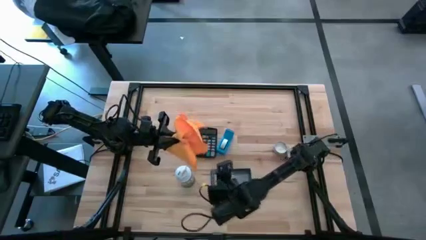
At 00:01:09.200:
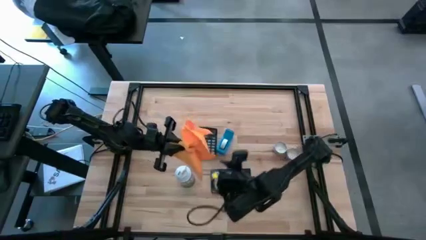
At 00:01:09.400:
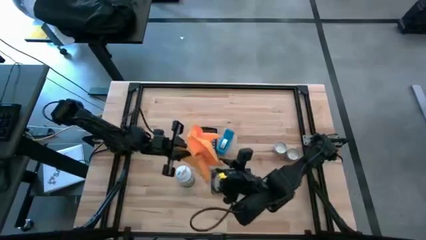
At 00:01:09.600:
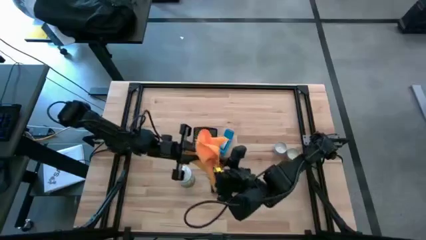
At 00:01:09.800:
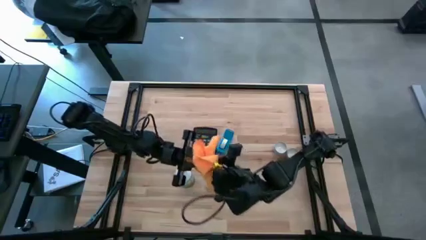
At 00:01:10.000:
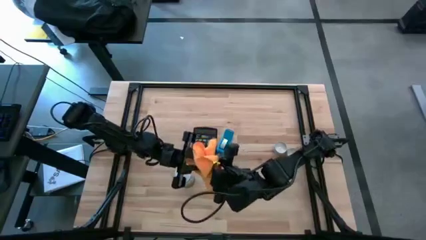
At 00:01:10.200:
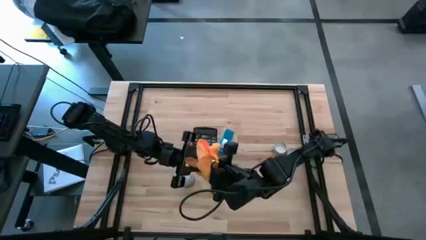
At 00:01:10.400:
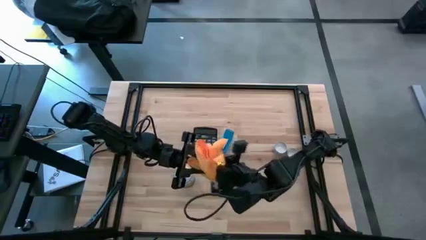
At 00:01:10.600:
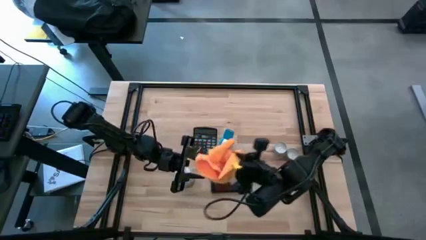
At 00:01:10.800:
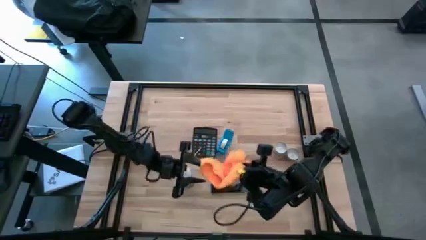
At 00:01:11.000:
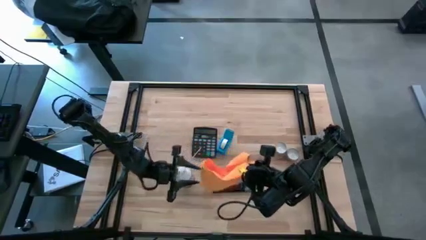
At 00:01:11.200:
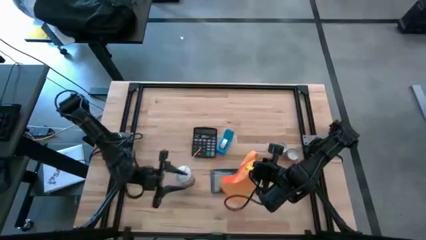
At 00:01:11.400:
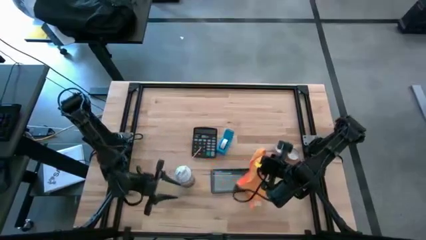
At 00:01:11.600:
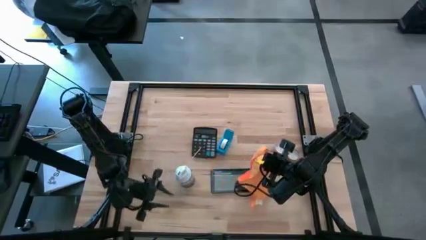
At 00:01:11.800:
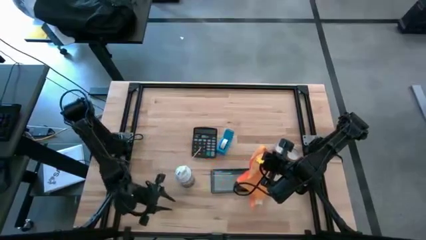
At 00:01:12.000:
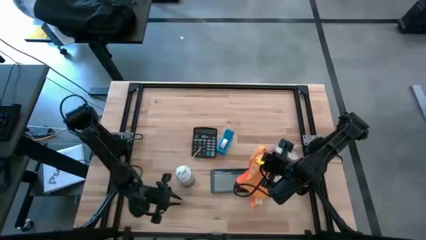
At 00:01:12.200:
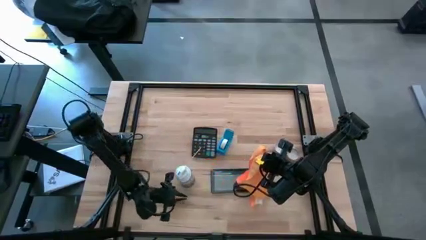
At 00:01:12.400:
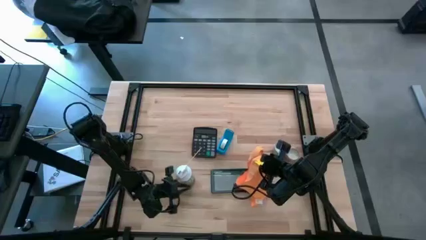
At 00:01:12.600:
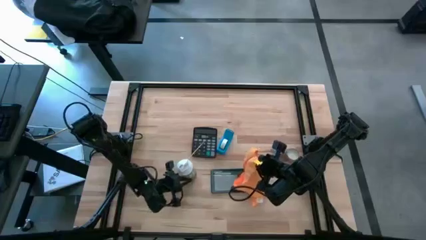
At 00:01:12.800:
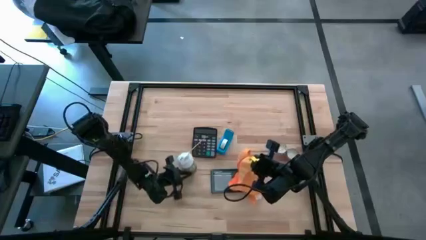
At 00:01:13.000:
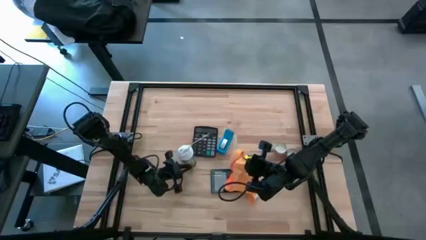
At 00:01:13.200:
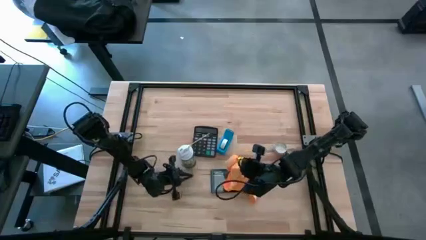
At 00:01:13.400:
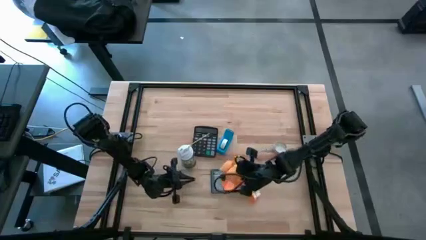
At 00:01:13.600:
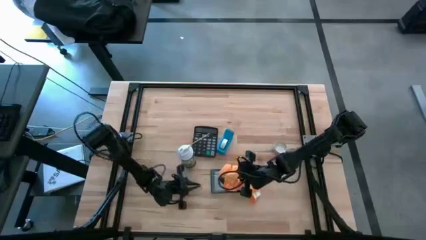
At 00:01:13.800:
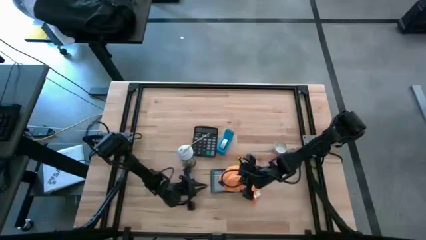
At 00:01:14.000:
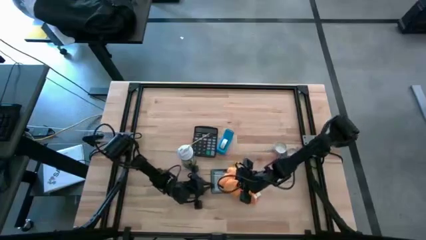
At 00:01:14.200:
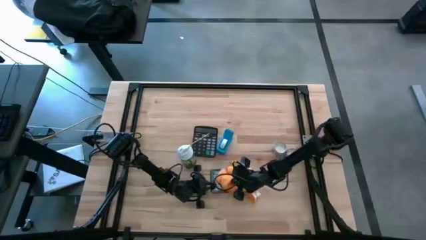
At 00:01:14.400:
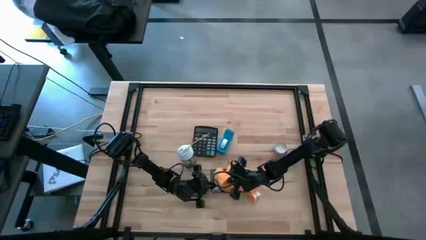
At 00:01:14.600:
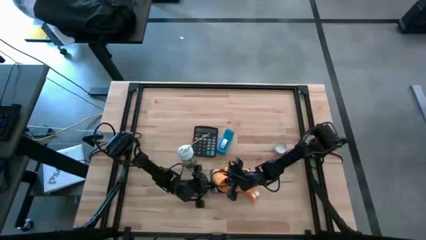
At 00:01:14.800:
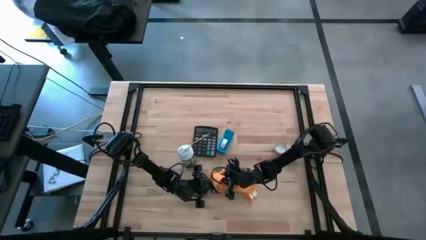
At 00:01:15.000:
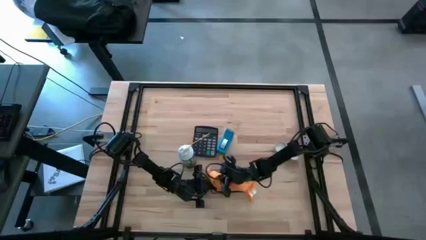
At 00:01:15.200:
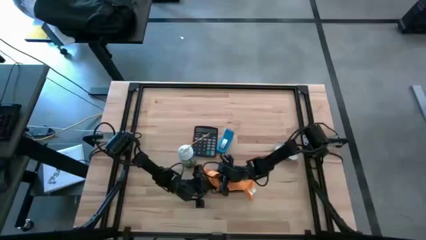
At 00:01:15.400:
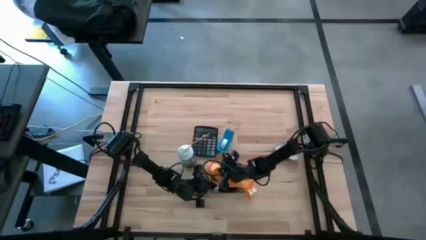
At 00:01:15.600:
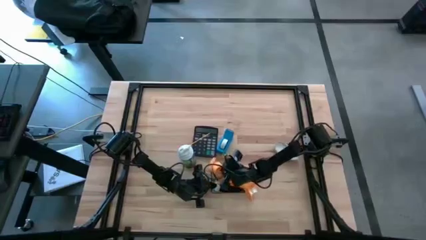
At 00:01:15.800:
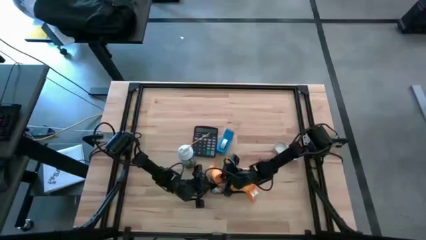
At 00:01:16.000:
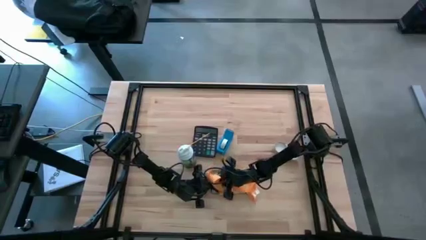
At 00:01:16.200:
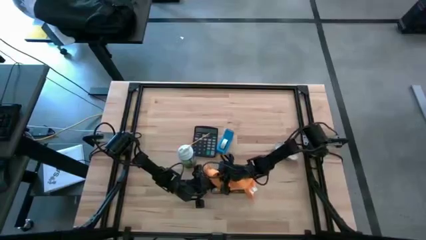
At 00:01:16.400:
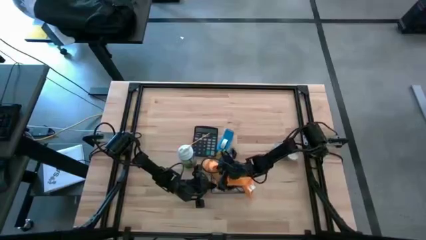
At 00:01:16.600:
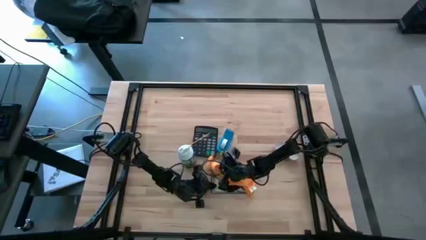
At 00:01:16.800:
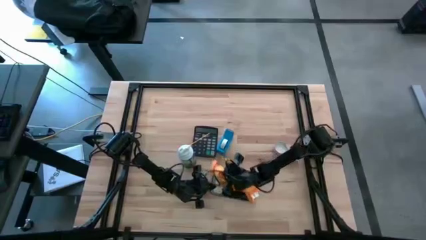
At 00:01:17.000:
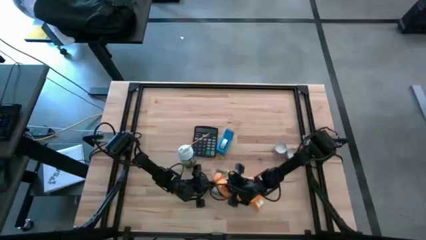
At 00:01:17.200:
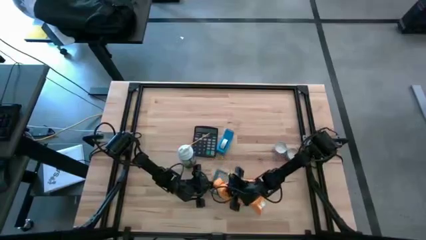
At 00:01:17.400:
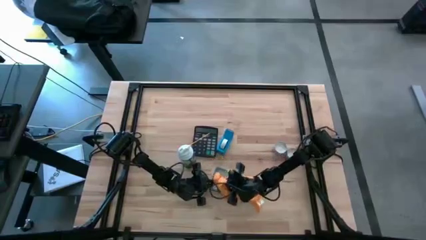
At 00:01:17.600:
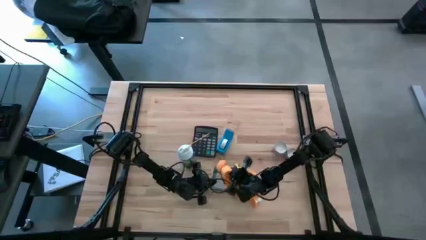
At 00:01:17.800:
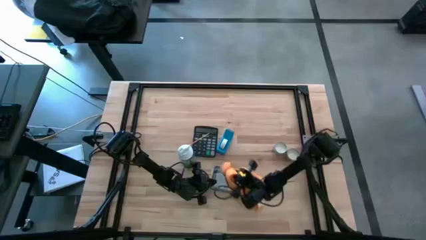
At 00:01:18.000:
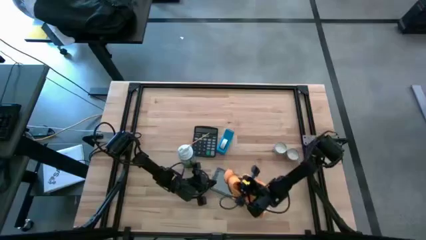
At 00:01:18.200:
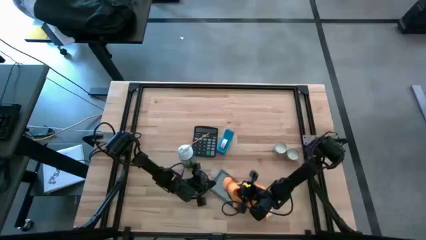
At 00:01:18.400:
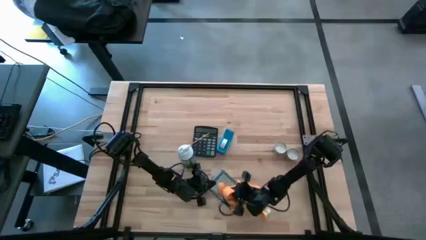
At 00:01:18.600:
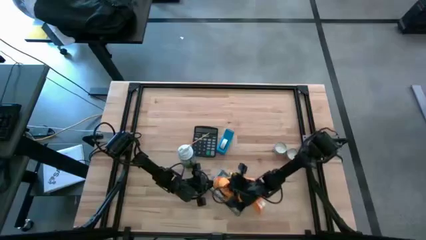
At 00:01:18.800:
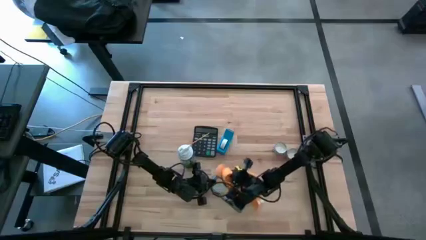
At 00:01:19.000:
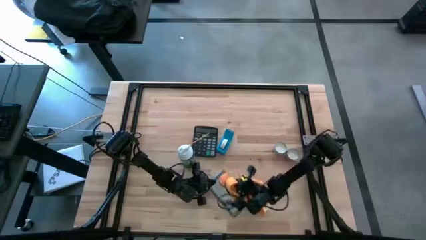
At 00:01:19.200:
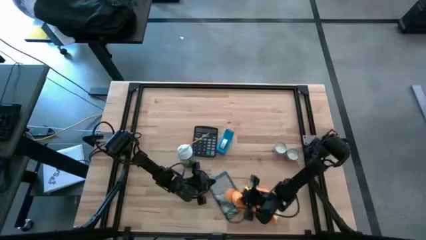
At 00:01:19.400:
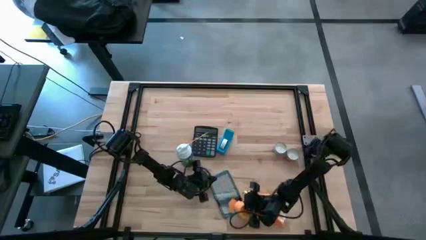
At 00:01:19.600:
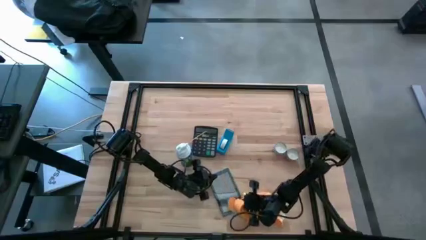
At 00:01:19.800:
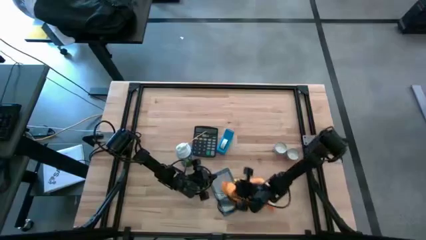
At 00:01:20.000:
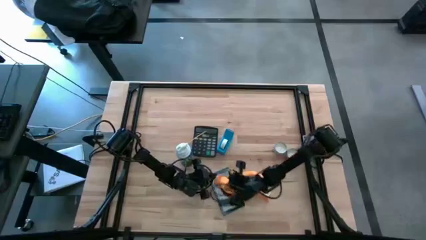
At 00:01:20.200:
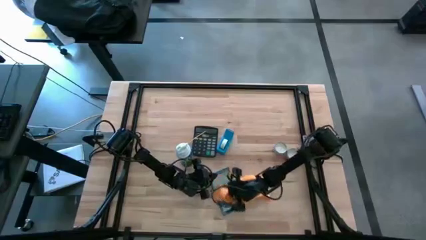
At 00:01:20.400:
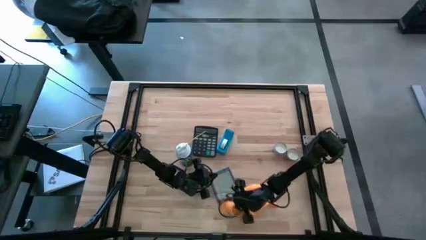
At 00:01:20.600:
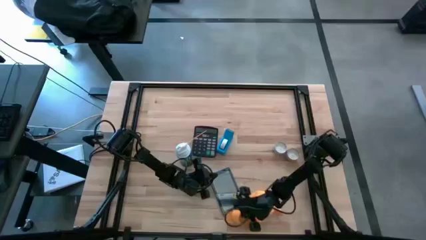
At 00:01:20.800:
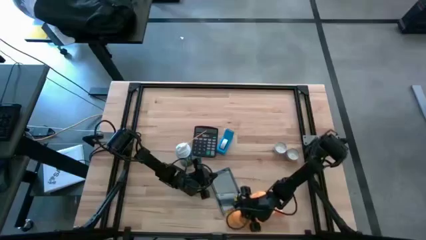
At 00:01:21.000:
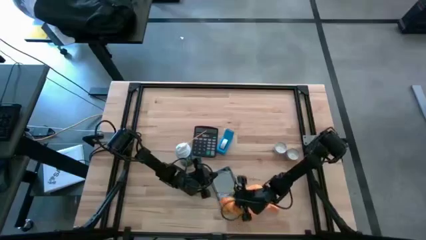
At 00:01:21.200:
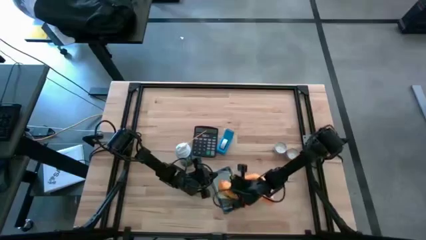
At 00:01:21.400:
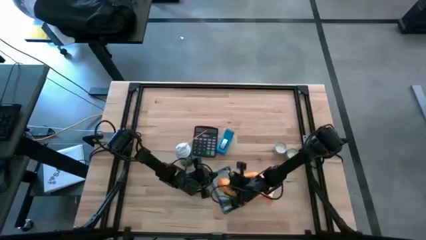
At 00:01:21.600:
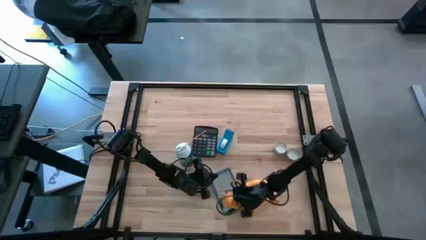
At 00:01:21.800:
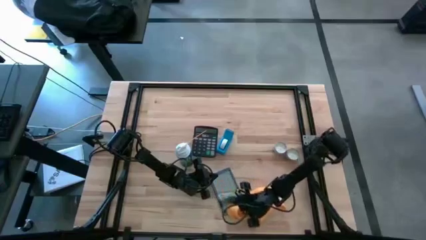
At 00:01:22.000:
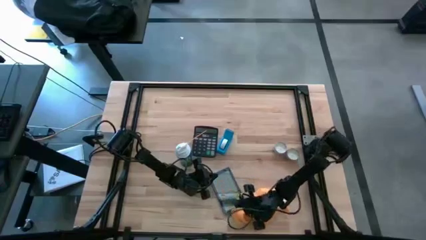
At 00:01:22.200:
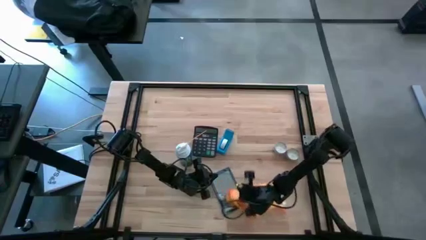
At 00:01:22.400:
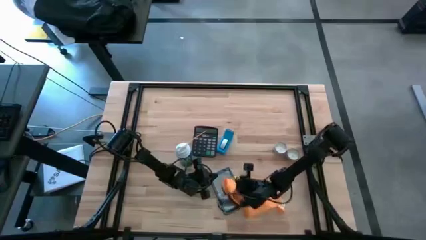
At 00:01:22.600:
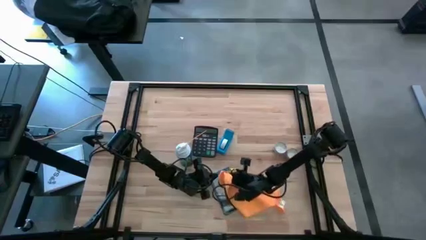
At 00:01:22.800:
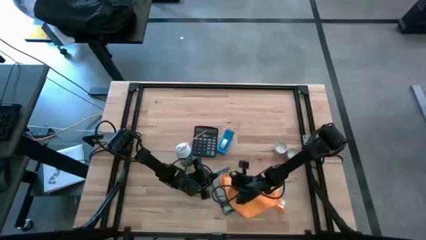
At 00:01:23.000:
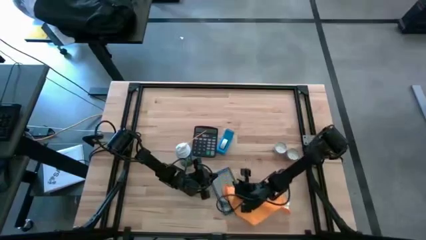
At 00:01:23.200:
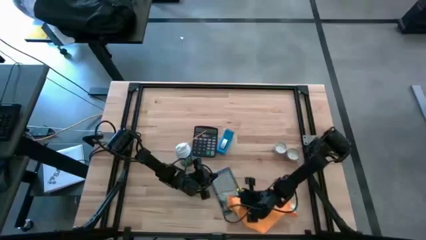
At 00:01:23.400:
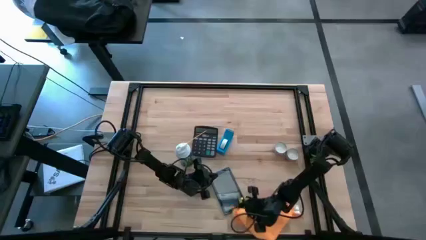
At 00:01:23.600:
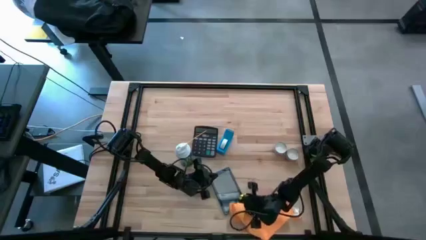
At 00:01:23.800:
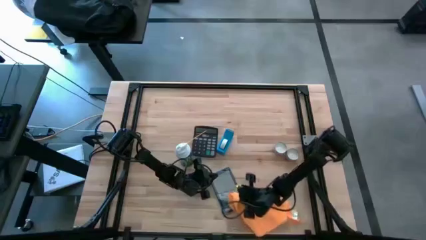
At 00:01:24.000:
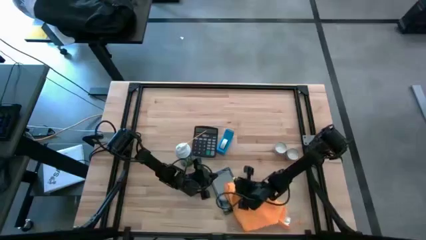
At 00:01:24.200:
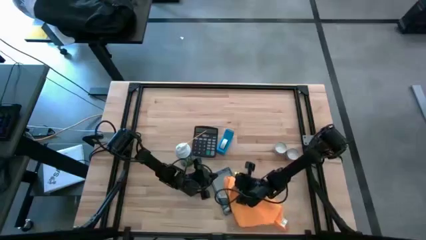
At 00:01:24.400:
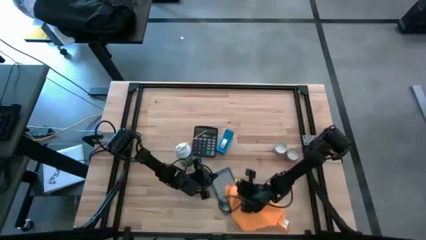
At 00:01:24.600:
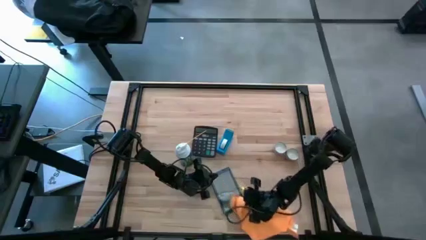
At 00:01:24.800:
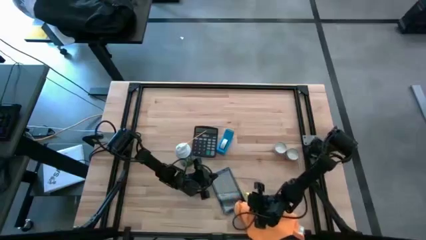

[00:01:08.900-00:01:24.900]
Task: Apply microfiber cloth
Wipe the tablet with the orange microfiber cloth
